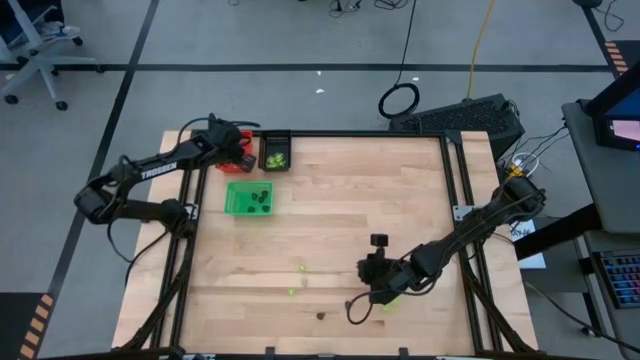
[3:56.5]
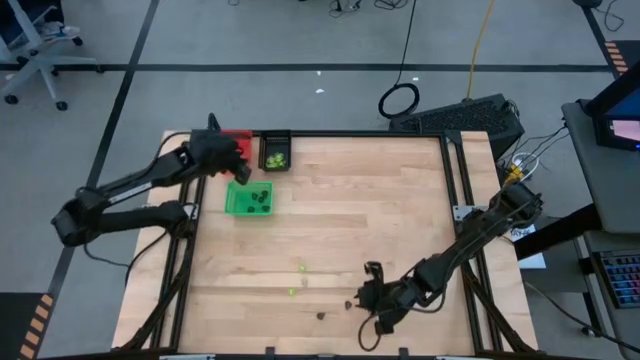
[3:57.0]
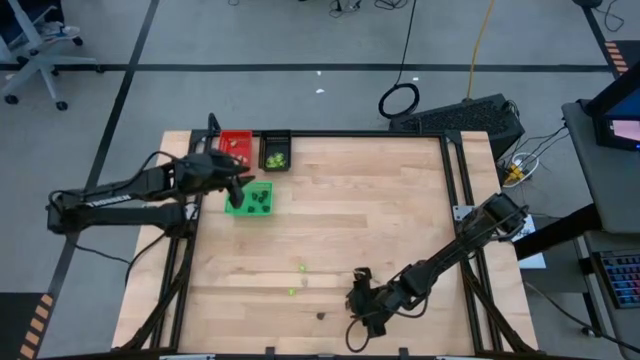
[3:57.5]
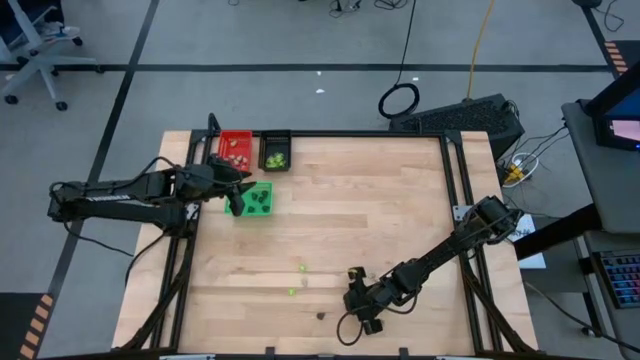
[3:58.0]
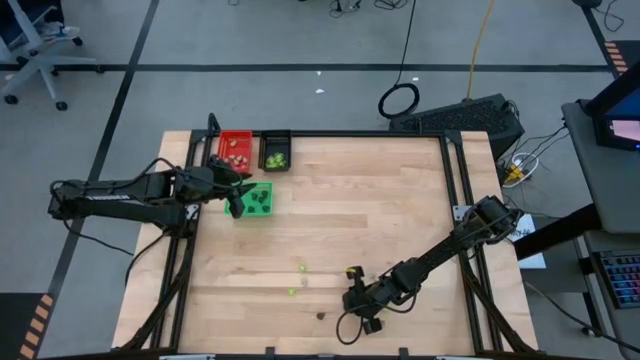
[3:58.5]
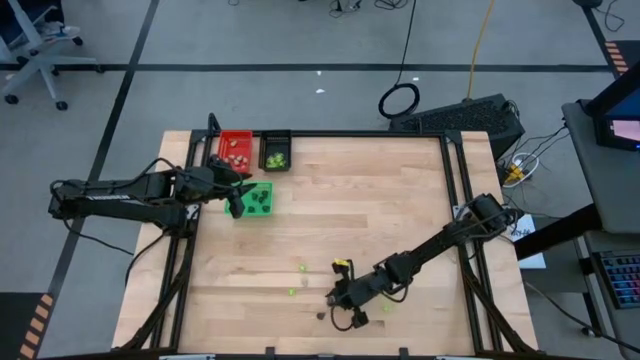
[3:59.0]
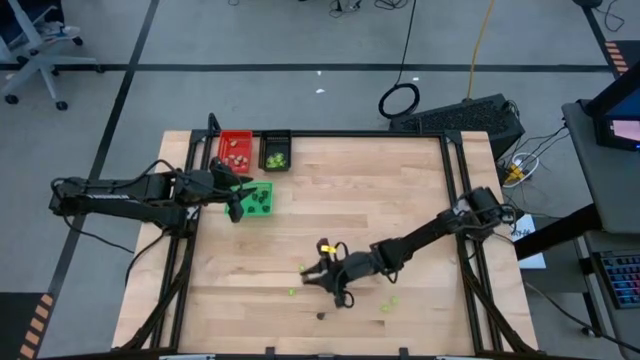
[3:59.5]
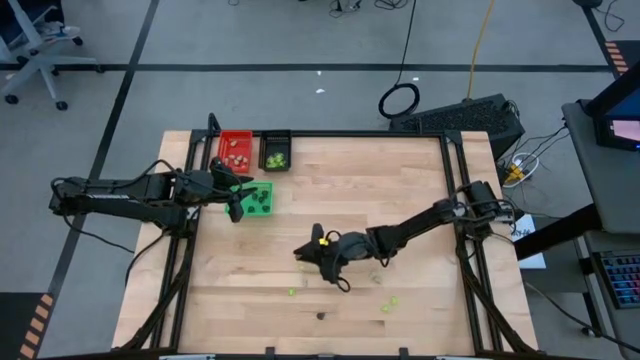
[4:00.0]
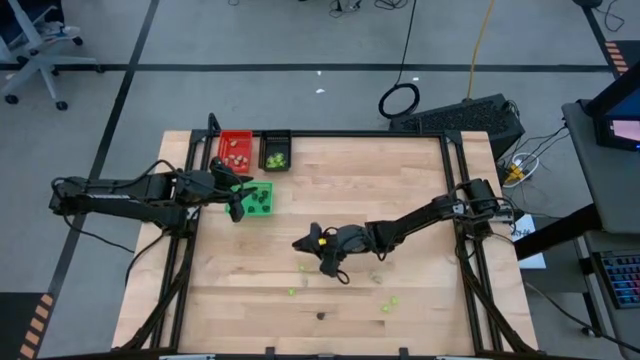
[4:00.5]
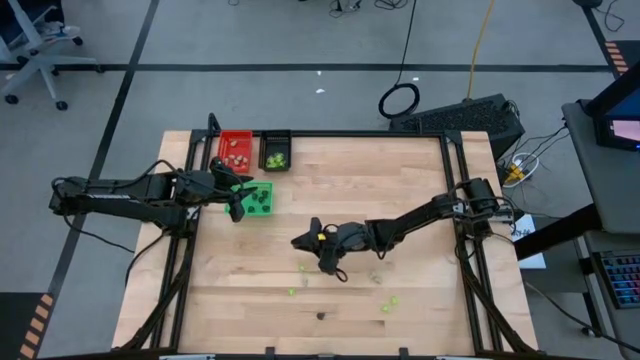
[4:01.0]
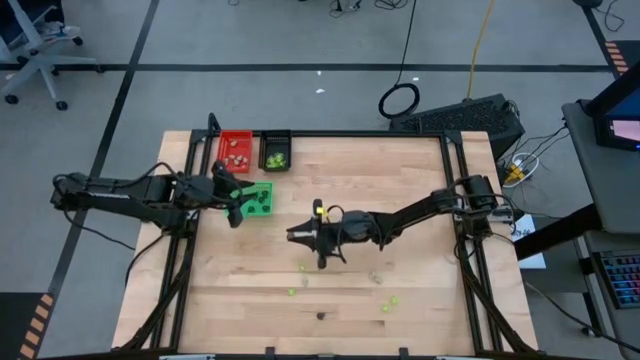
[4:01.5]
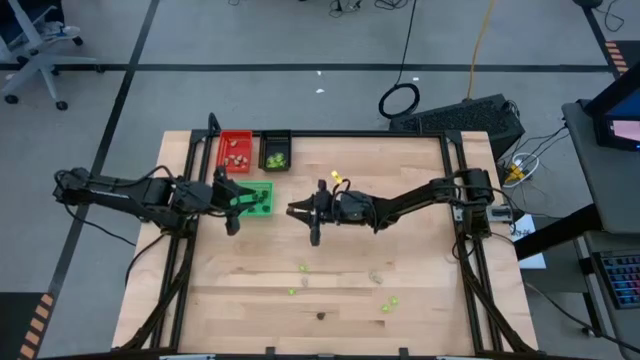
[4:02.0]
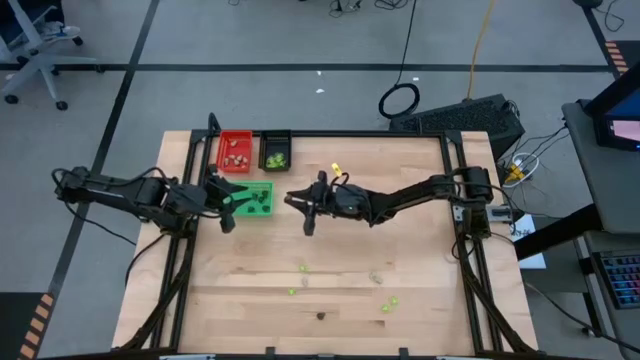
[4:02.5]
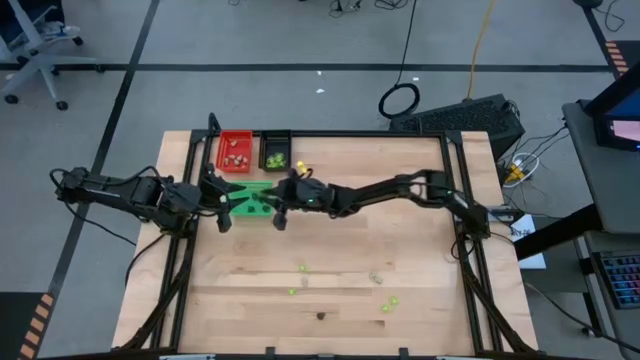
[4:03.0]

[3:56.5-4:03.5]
Task: Sort Halloween decoration
Put the black skull toy into the green bin

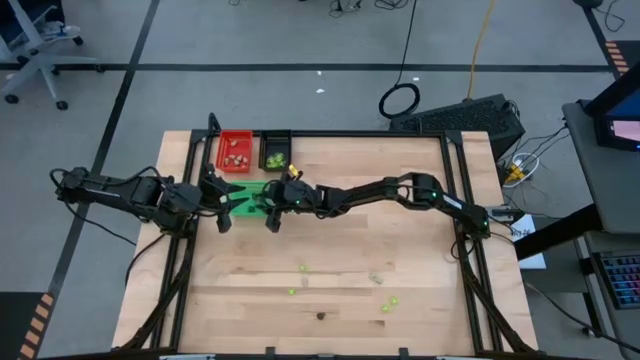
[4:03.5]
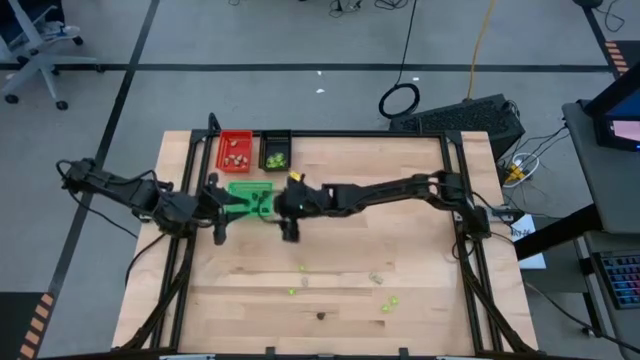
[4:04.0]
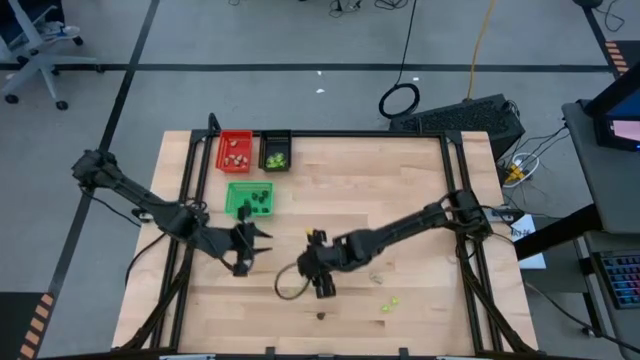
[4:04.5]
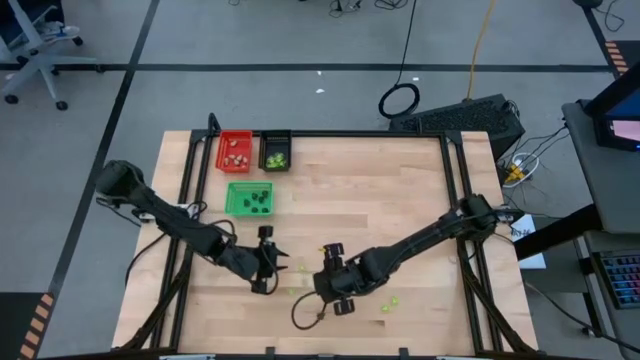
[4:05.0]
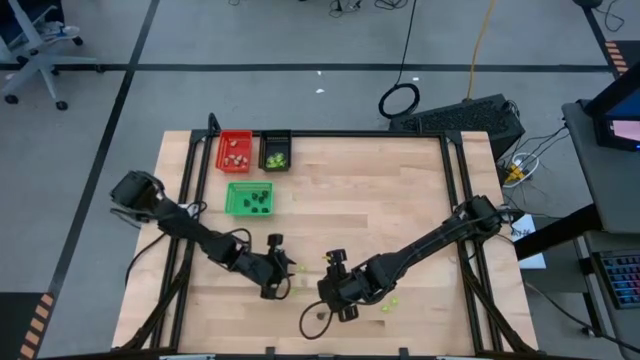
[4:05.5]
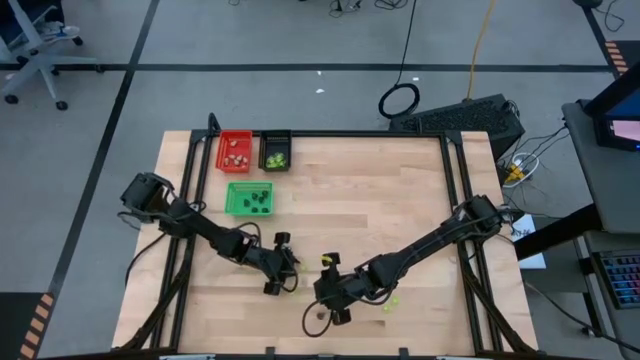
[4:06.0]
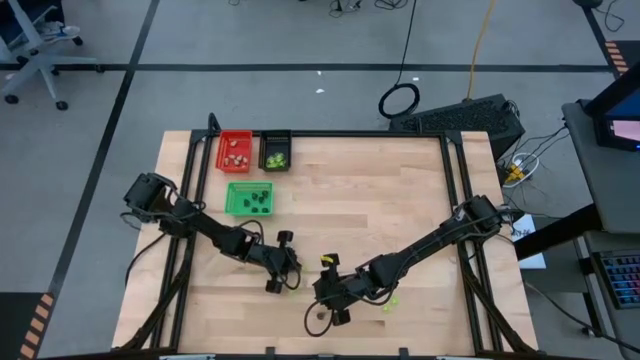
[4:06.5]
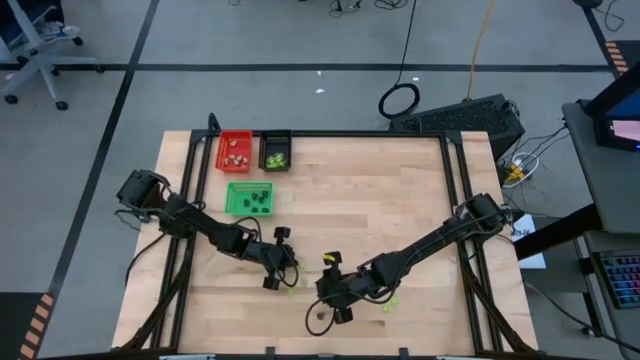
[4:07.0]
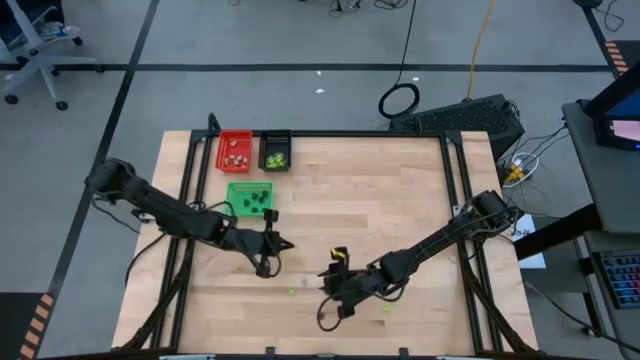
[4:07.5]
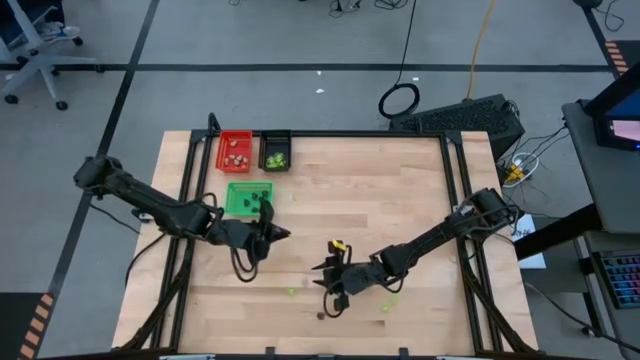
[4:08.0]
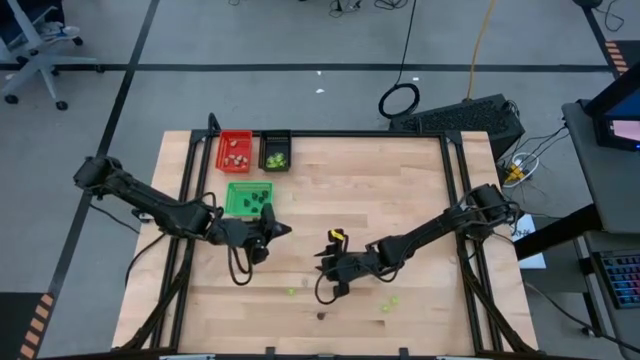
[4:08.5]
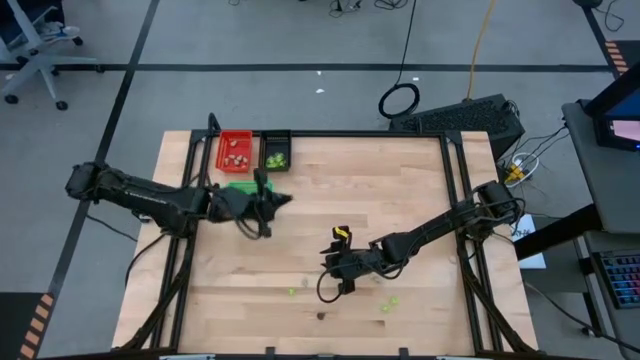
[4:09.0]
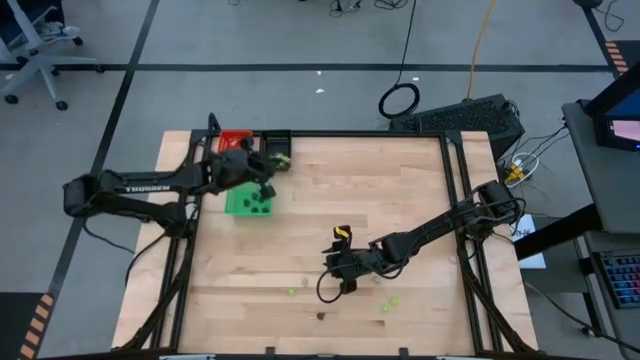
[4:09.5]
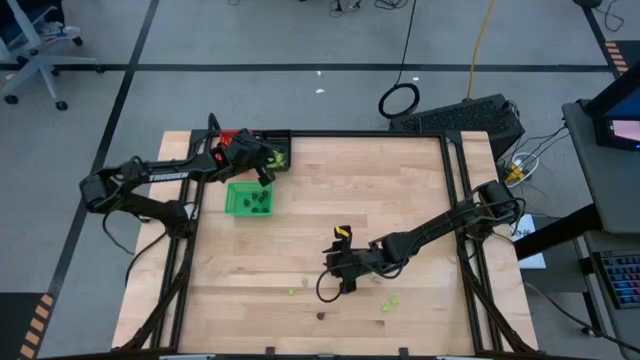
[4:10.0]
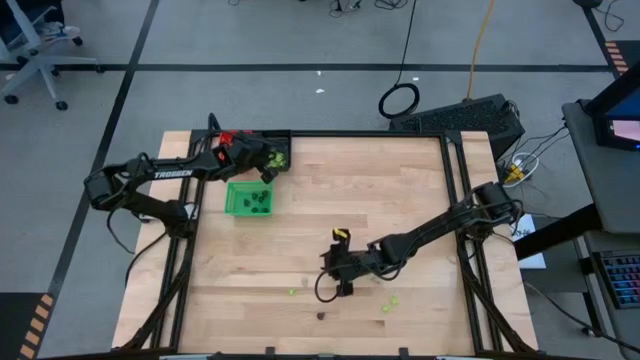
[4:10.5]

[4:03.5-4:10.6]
Put the green spider toy into the black bin

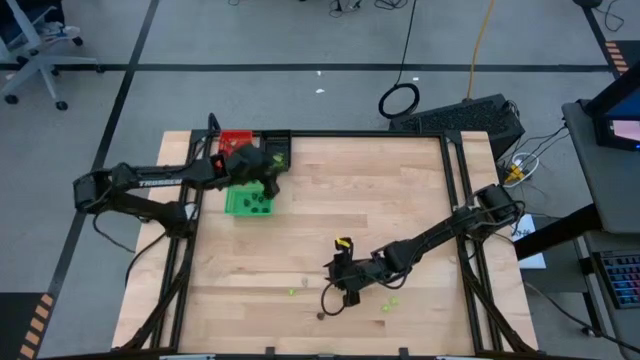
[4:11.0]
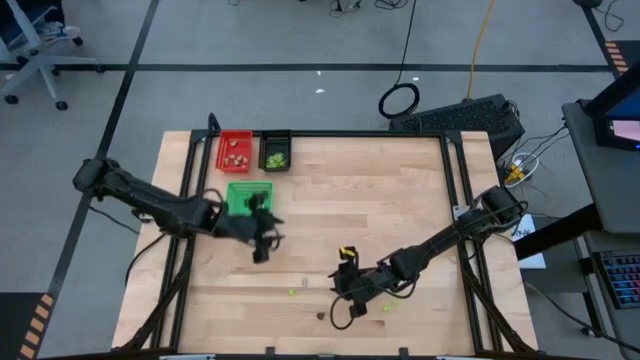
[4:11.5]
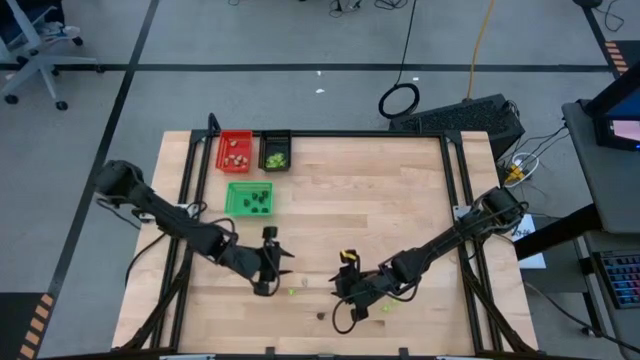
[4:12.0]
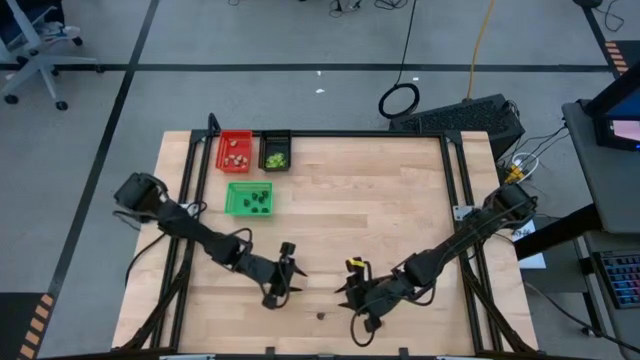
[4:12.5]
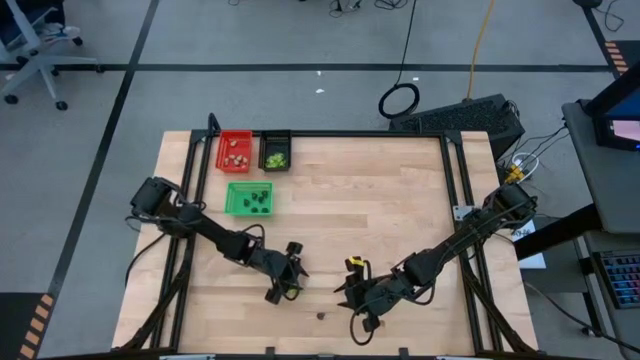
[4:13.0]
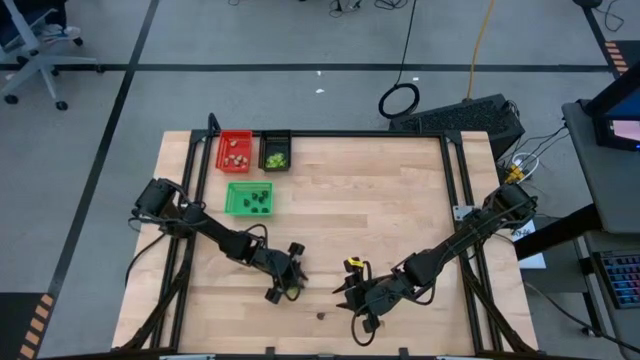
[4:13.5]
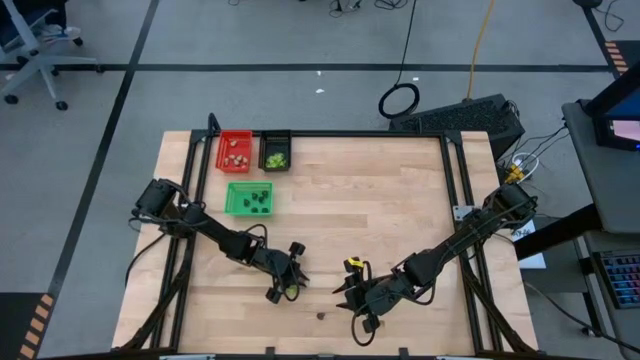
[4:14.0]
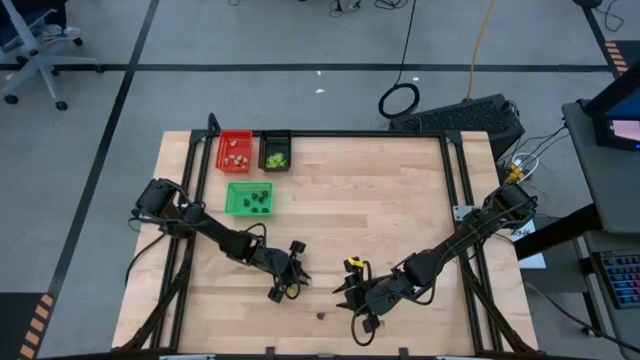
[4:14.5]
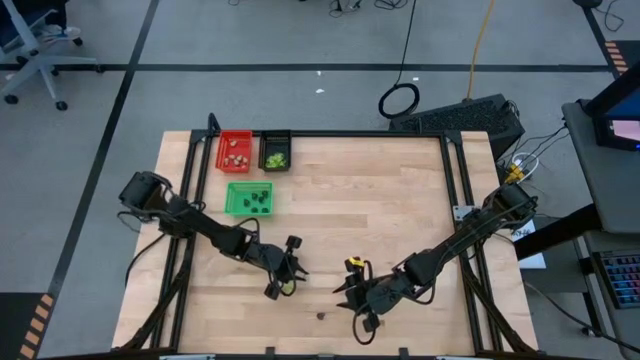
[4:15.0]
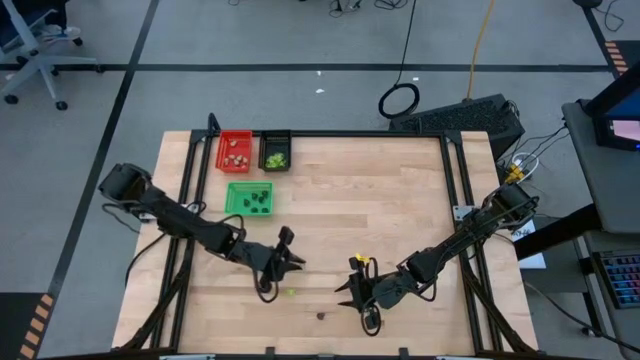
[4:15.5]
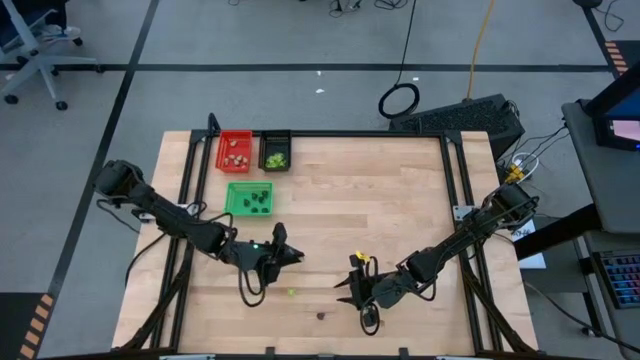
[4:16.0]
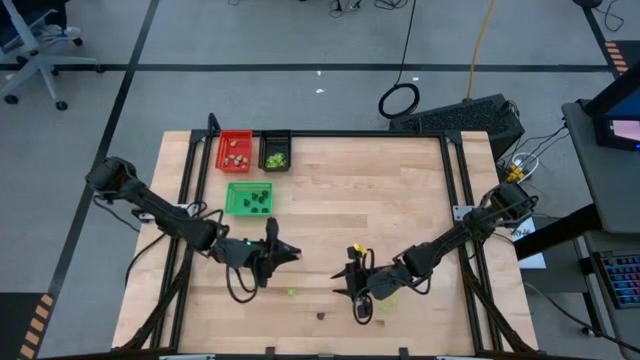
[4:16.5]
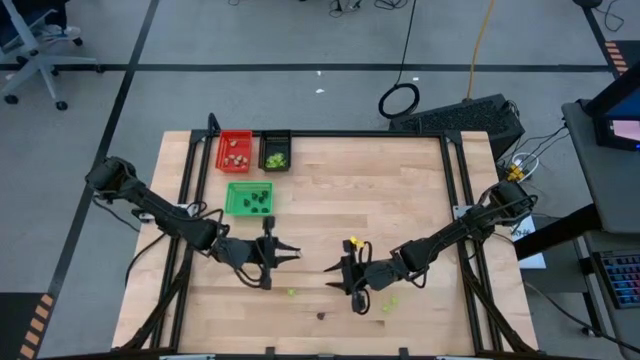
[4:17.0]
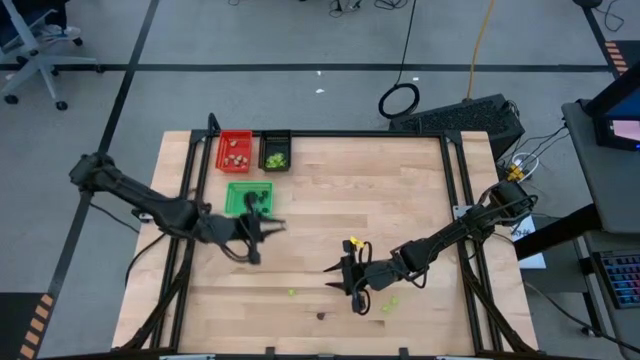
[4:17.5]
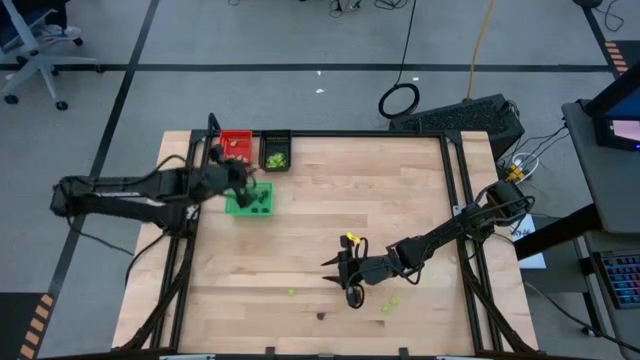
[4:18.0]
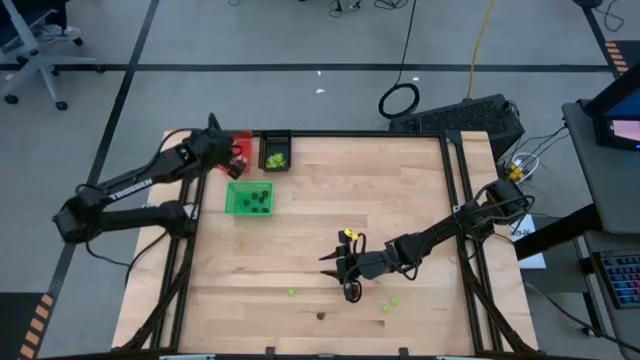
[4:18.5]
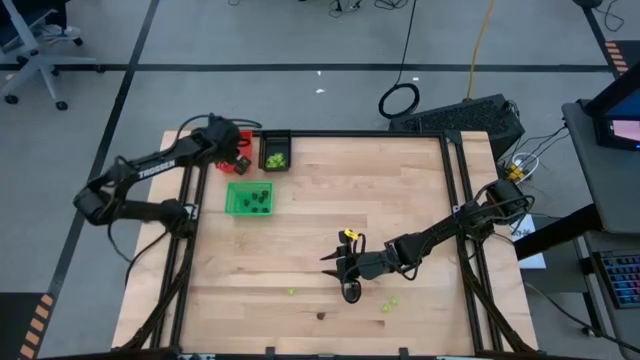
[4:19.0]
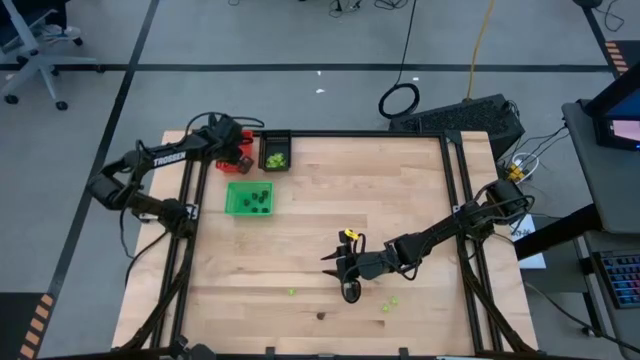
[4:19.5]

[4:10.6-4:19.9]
Put the white skull toy into the red bin
